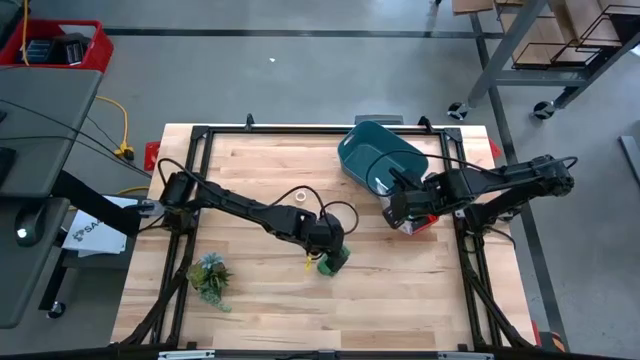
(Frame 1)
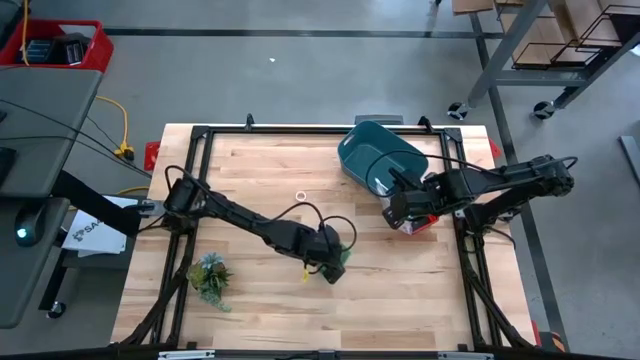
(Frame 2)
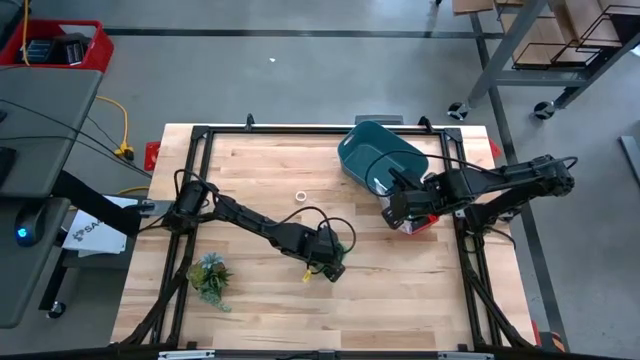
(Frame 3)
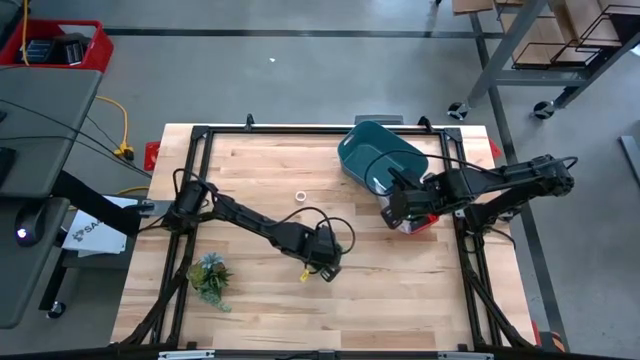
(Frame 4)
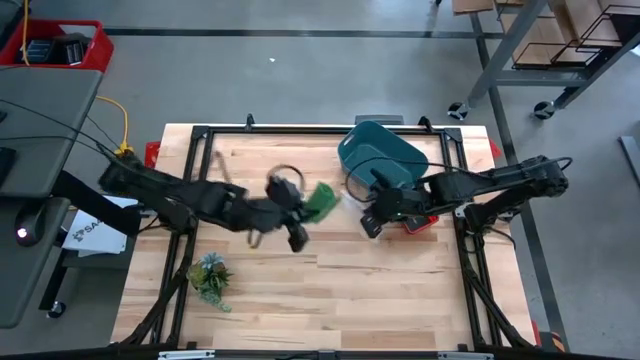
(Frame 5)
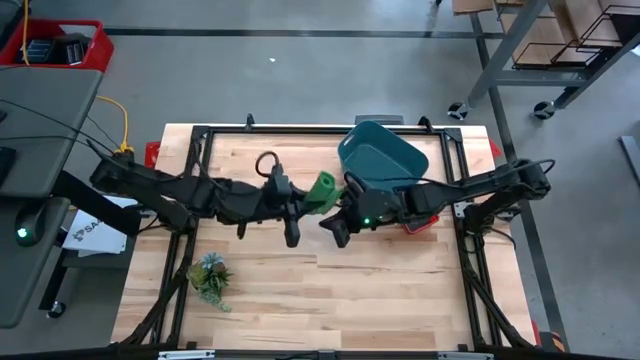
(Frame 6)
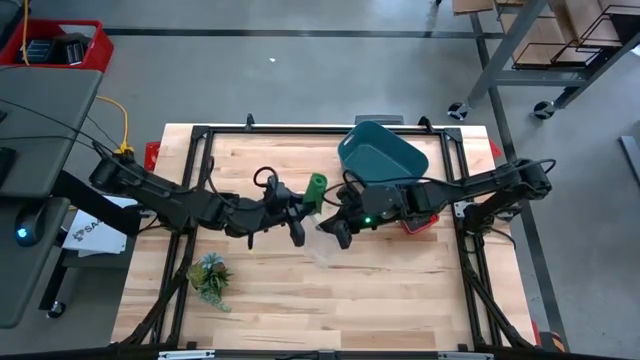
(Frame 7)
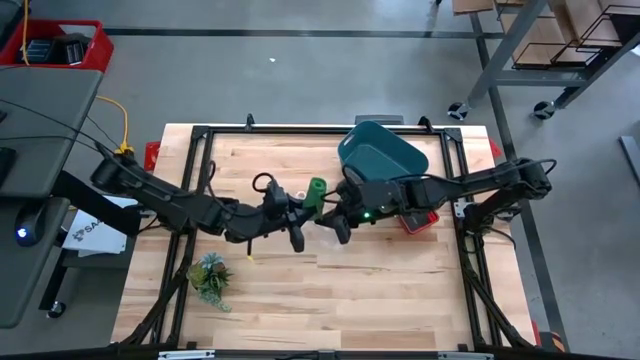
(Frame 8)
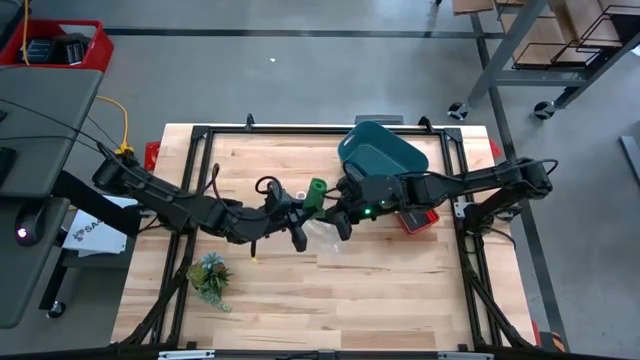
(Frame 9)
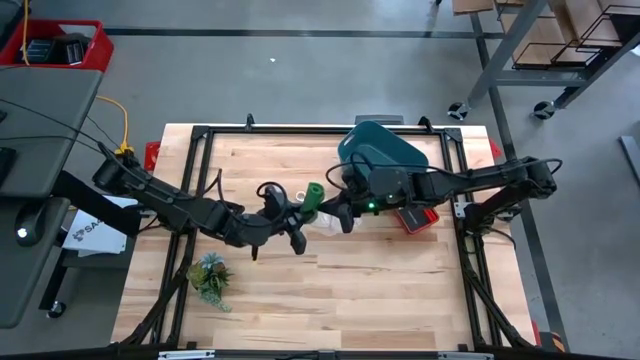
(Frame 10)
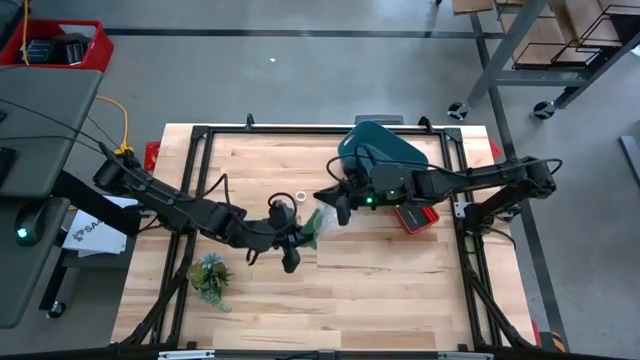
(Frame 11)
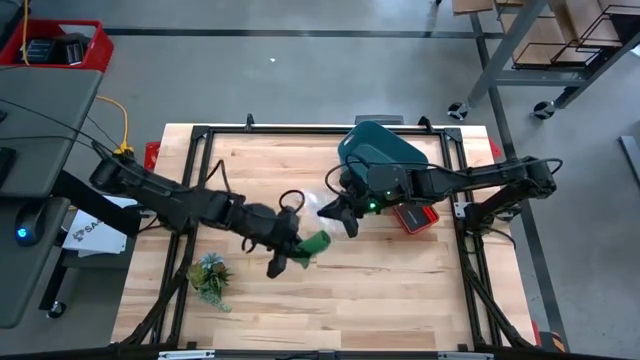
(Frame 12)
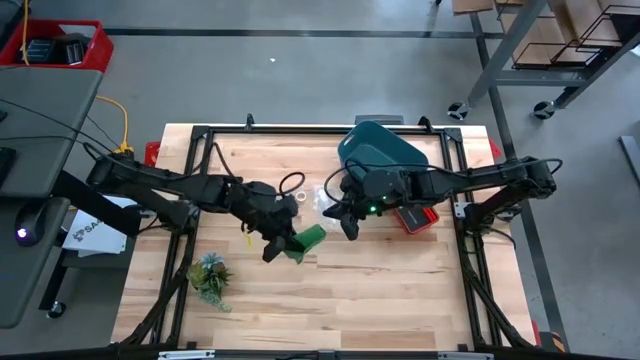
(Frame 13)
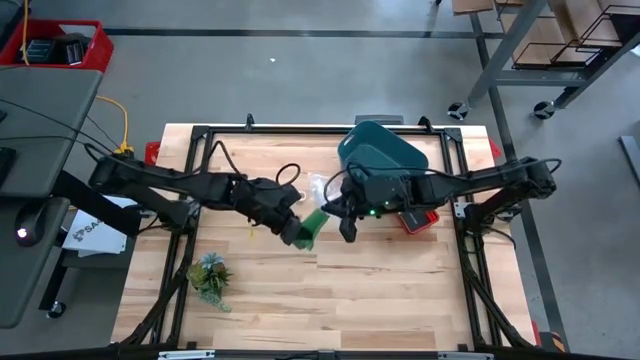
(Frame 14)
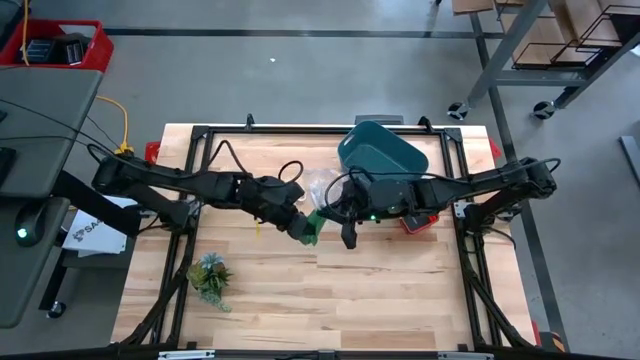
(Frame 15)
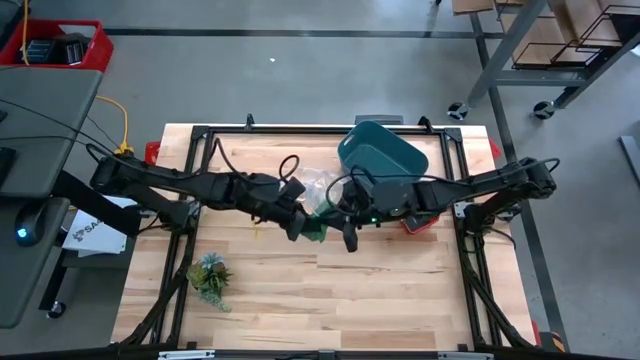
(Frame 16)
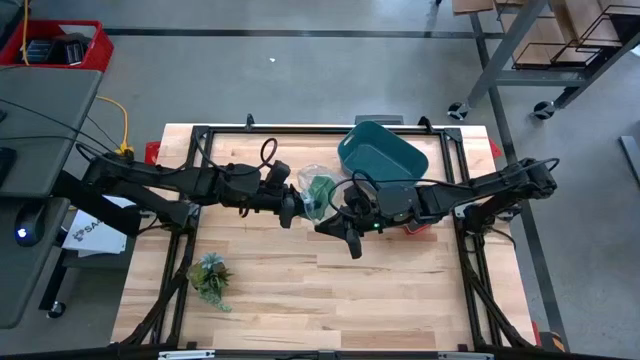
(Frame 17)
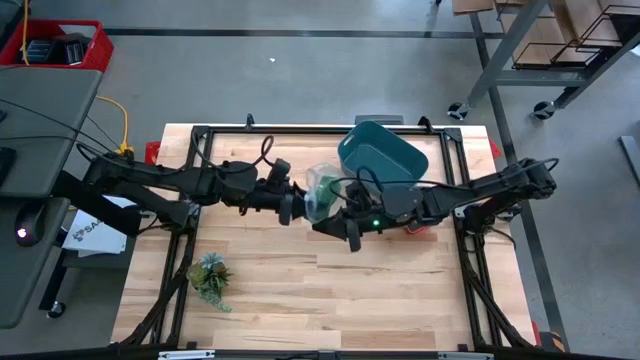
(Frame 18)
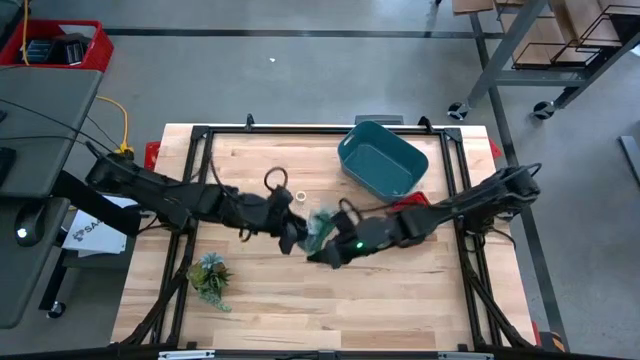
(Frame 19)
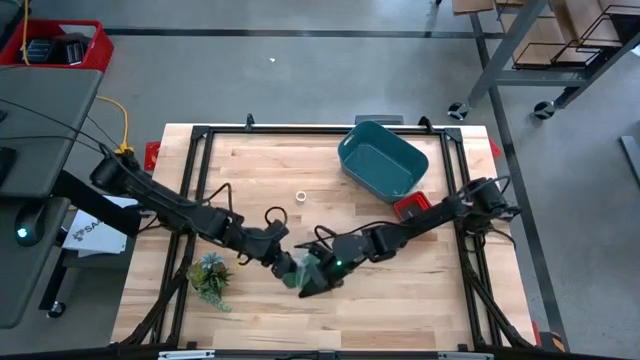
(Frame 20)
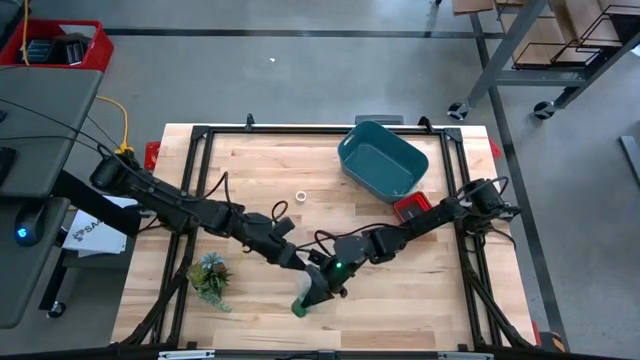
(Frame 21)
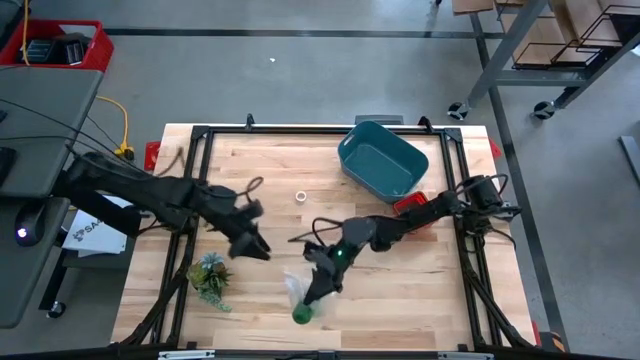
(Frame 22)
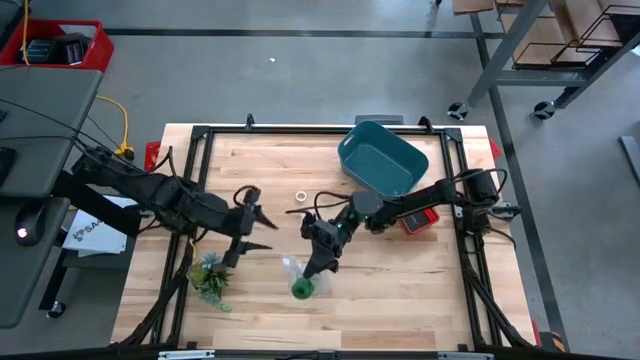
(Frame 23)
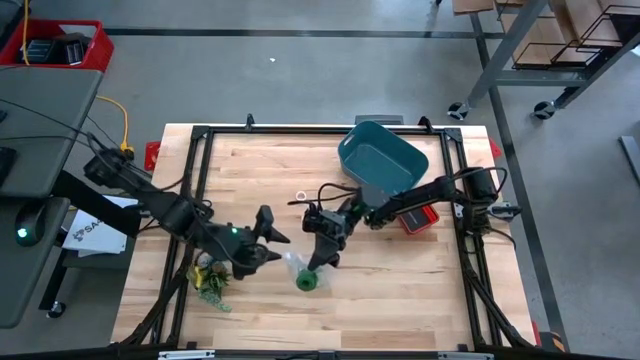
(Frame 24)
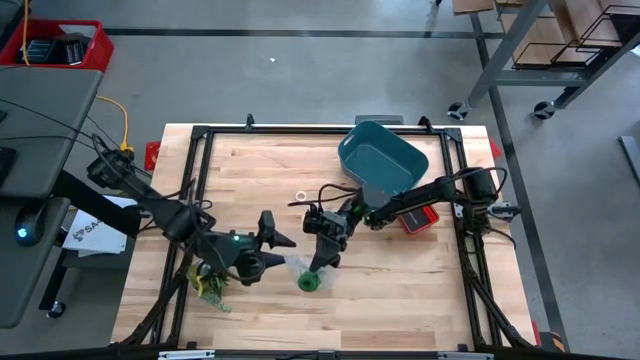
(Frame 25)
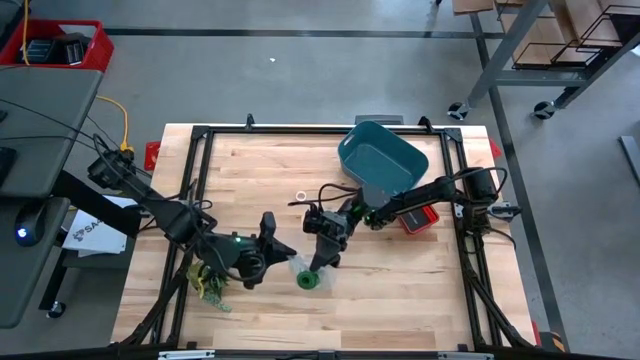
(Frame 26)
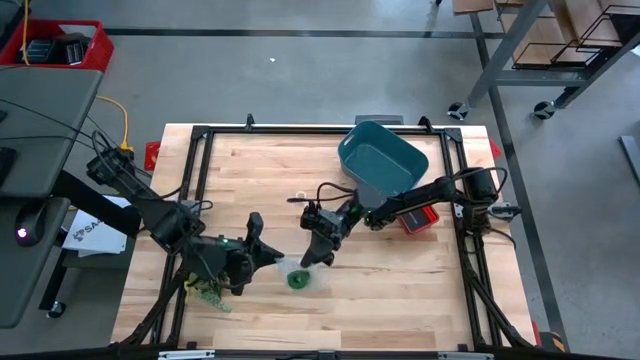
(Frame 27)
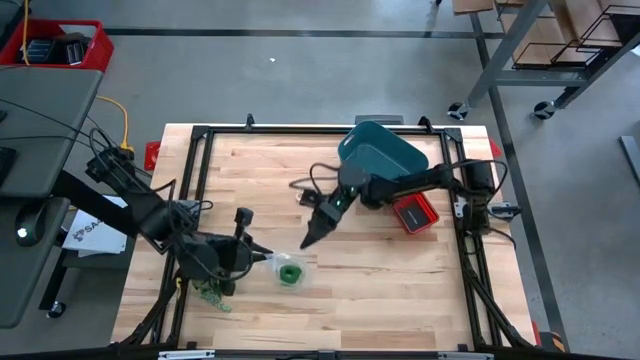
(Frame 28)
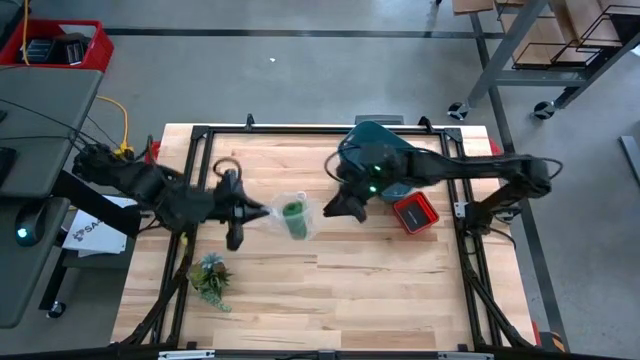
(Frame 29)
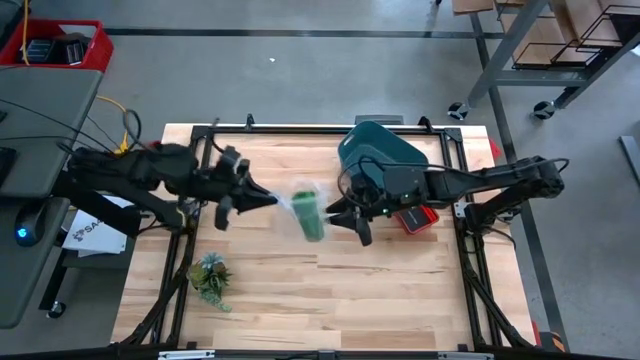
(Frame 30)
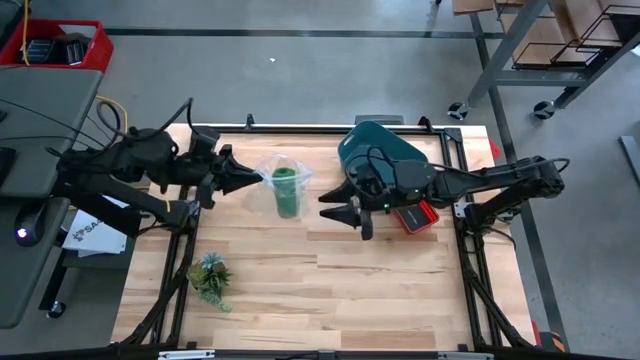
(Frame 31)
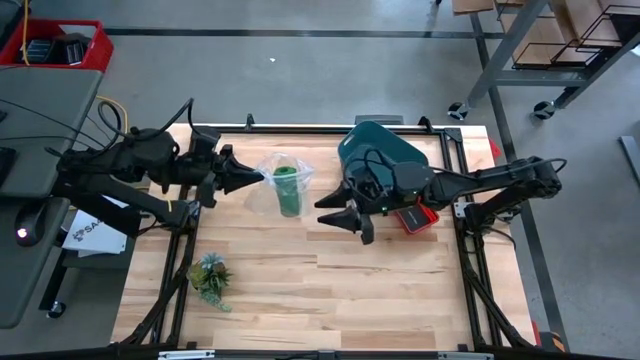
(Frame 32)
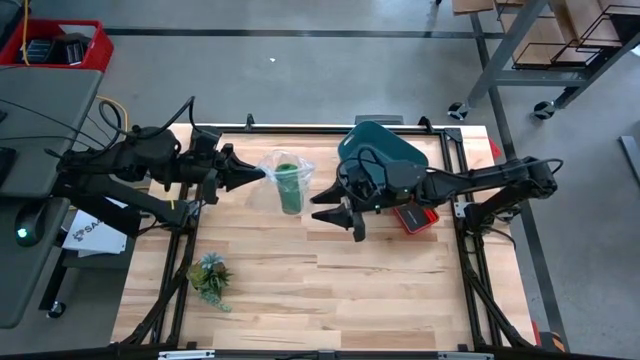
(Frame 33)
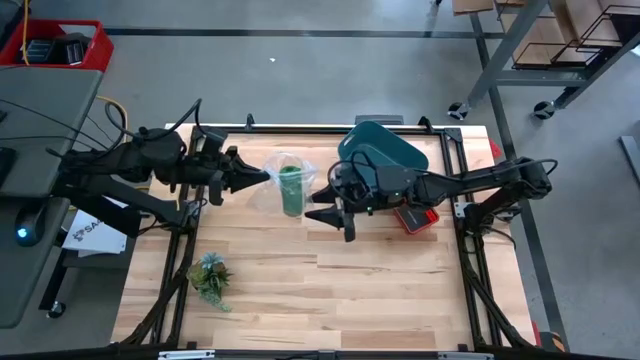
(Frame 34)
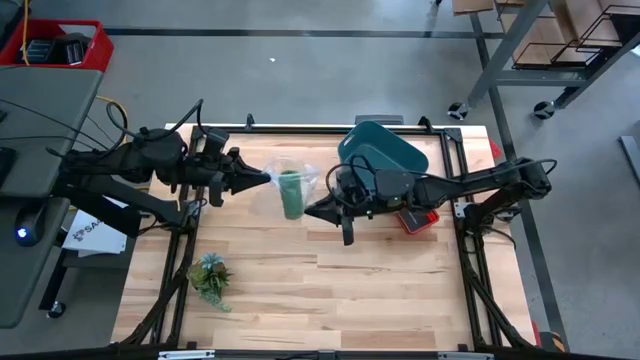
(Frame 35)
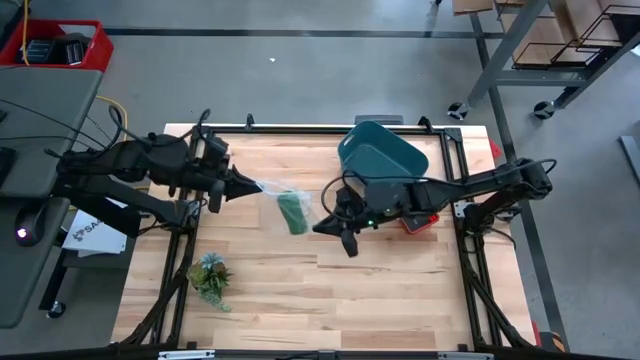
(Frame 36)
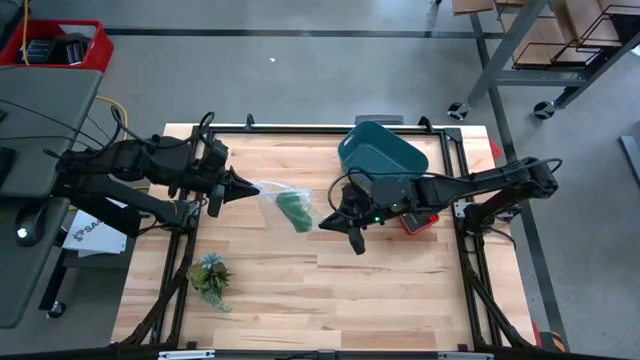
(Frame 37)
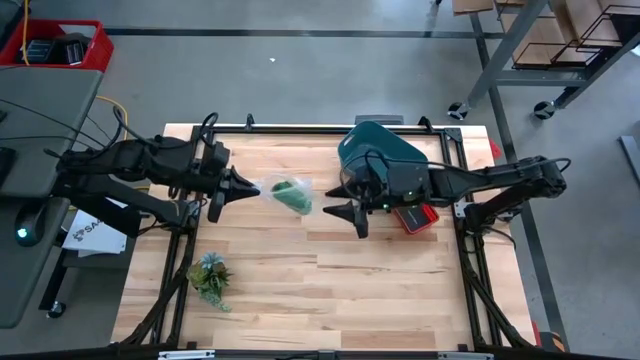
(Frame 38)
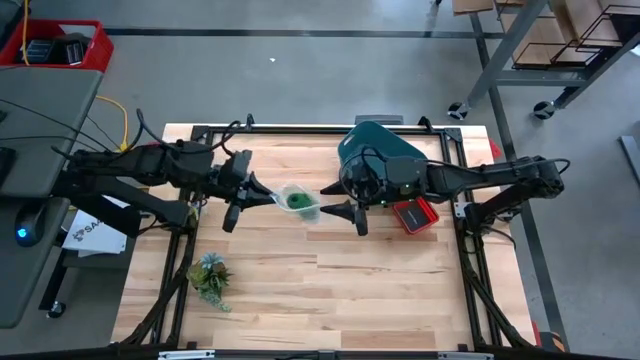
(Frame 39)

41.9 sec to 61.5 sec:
Task: Roll bandage
Put the green bandage into the transparent zip bag
